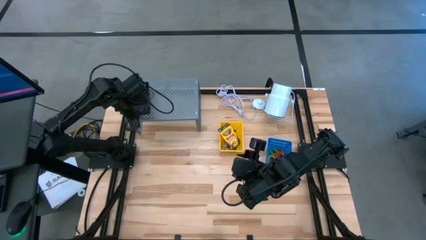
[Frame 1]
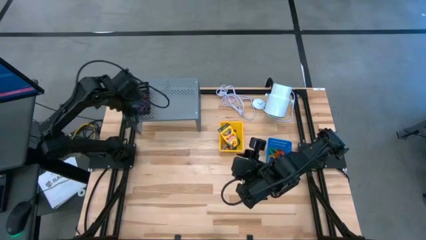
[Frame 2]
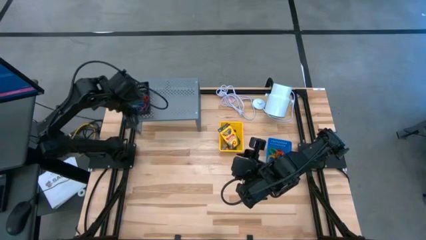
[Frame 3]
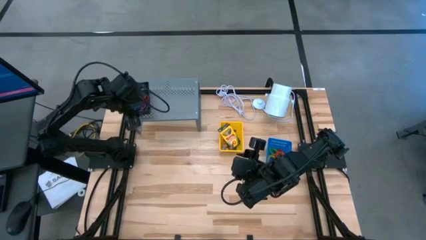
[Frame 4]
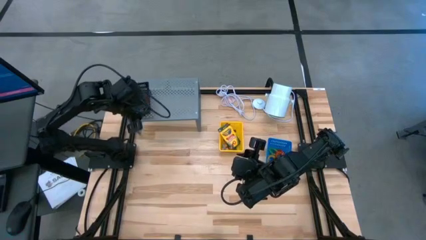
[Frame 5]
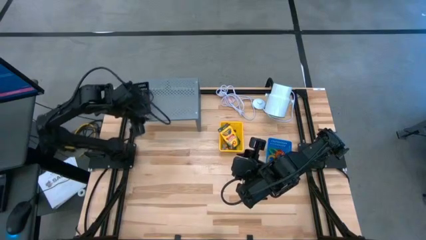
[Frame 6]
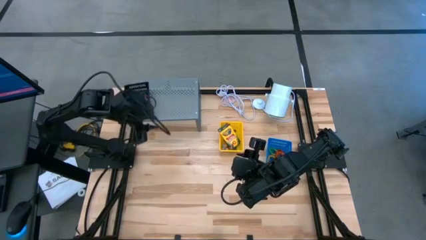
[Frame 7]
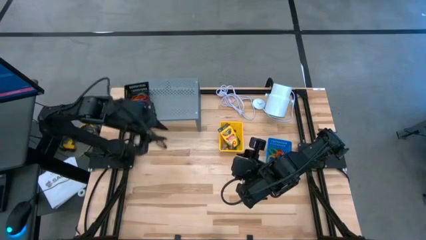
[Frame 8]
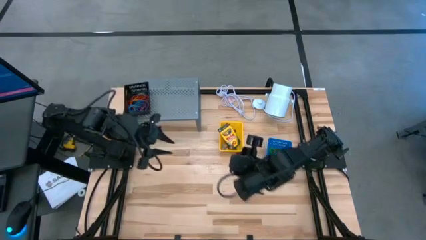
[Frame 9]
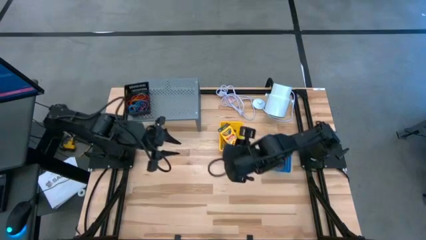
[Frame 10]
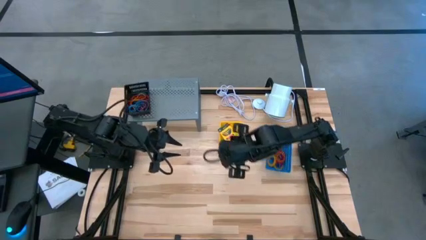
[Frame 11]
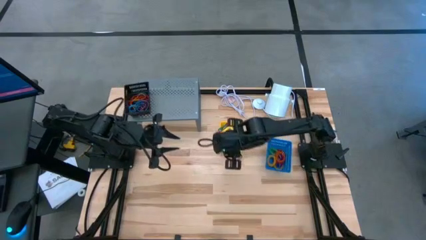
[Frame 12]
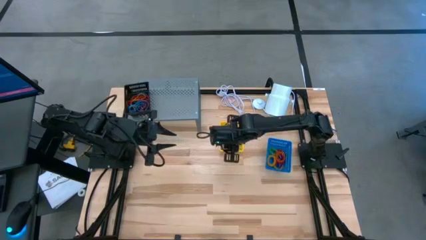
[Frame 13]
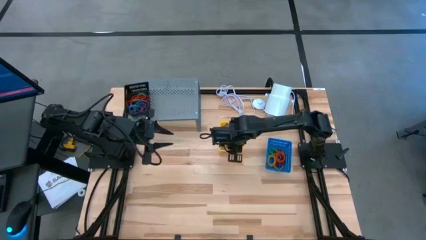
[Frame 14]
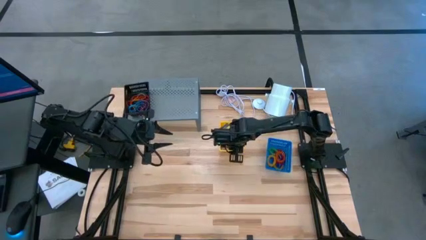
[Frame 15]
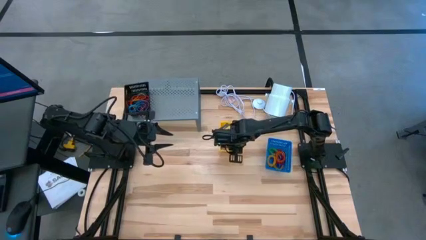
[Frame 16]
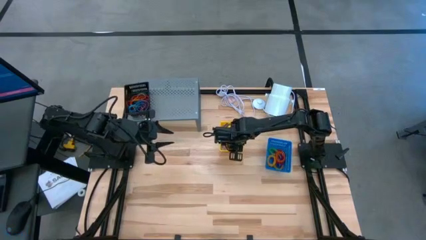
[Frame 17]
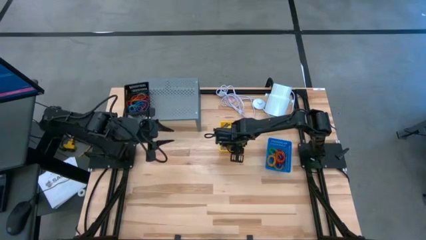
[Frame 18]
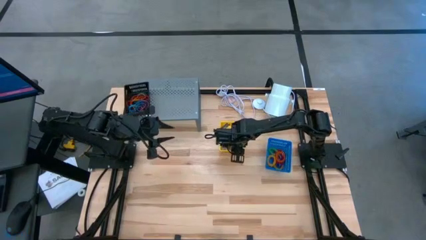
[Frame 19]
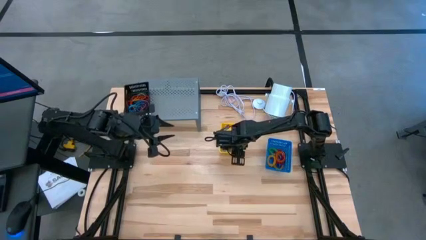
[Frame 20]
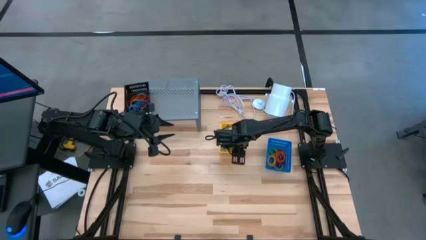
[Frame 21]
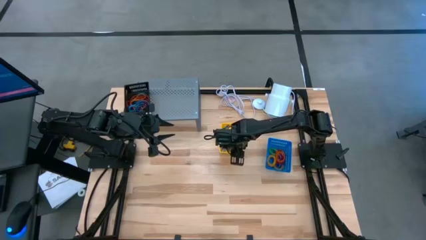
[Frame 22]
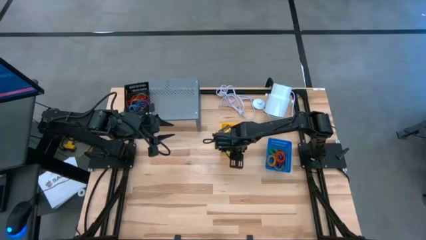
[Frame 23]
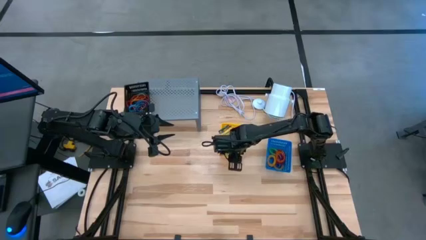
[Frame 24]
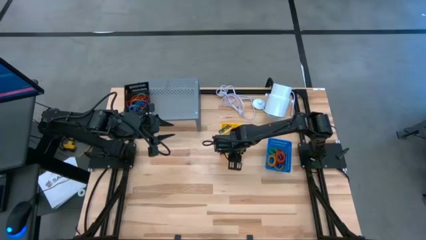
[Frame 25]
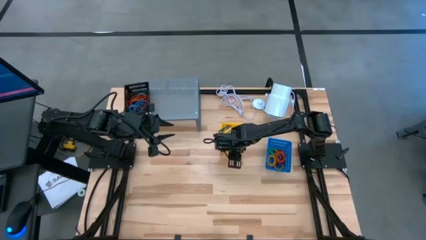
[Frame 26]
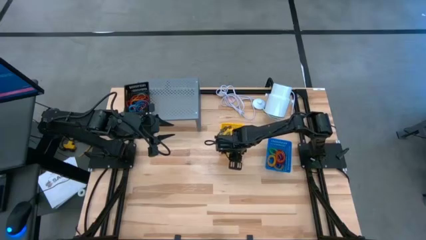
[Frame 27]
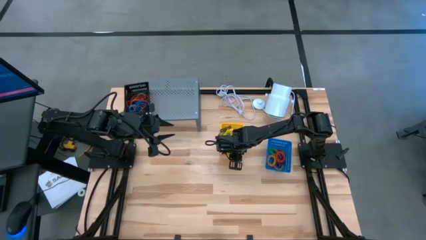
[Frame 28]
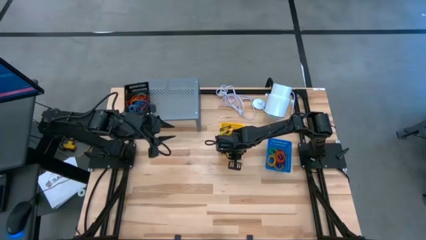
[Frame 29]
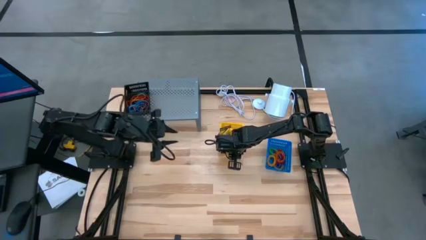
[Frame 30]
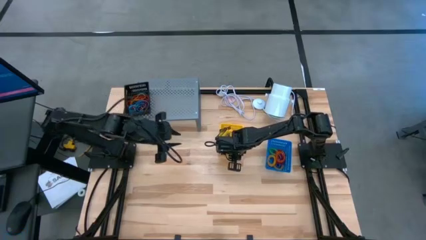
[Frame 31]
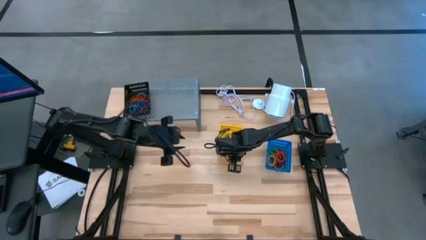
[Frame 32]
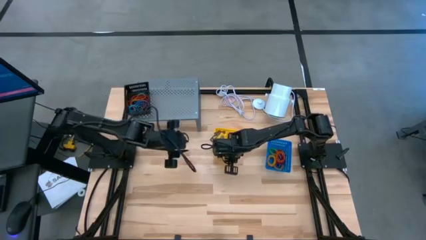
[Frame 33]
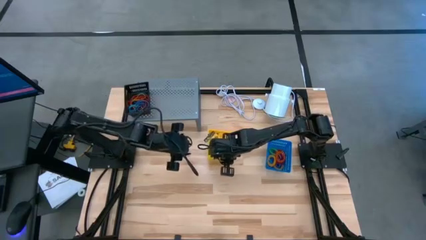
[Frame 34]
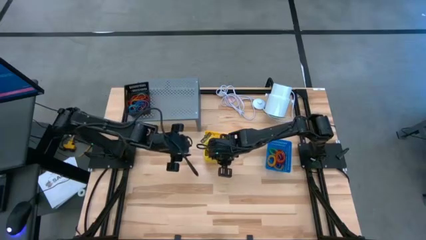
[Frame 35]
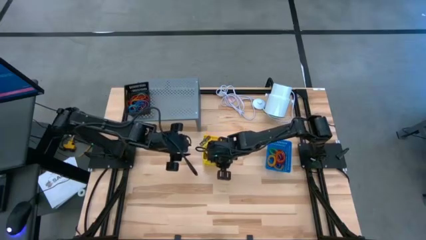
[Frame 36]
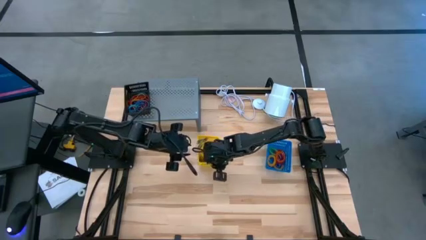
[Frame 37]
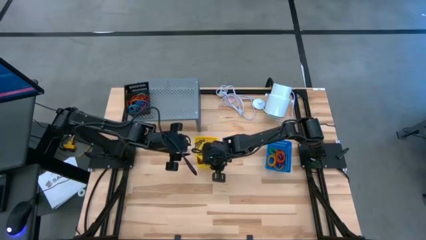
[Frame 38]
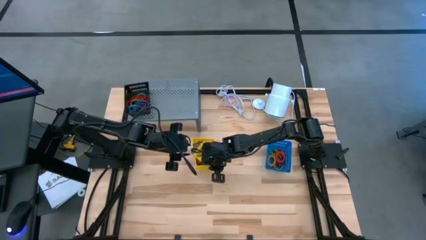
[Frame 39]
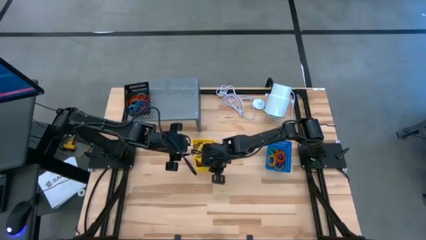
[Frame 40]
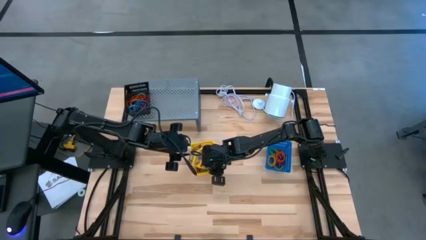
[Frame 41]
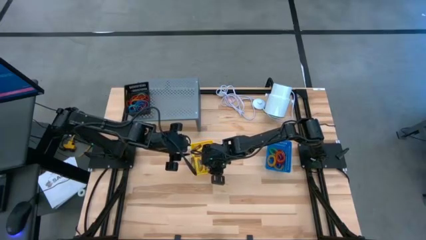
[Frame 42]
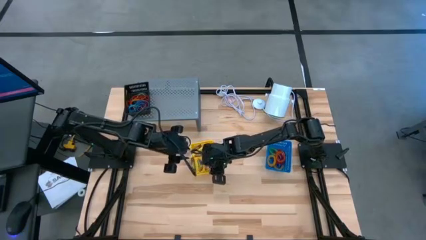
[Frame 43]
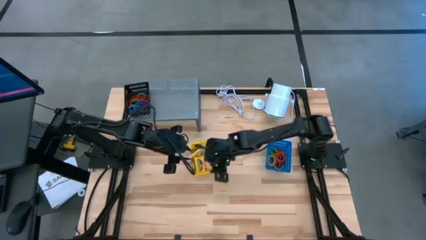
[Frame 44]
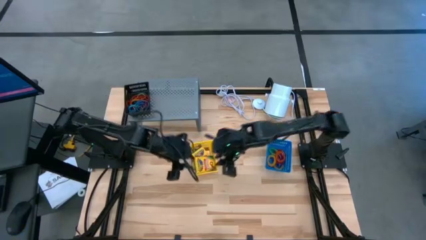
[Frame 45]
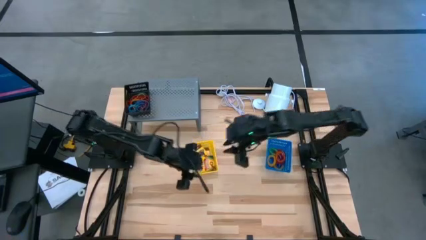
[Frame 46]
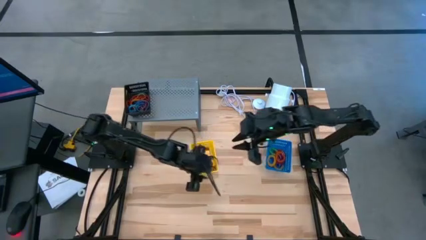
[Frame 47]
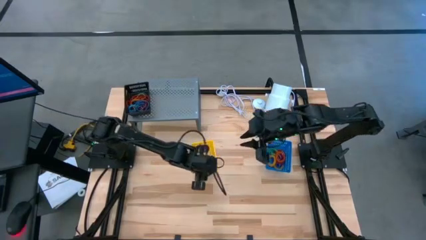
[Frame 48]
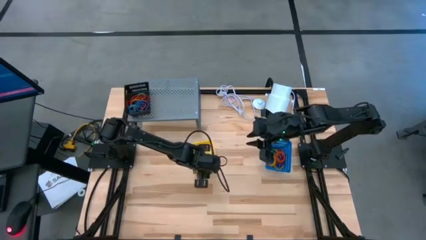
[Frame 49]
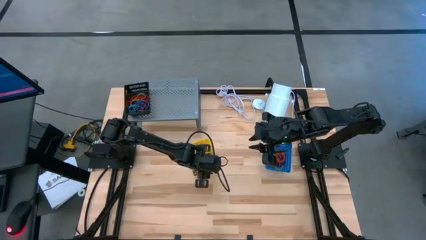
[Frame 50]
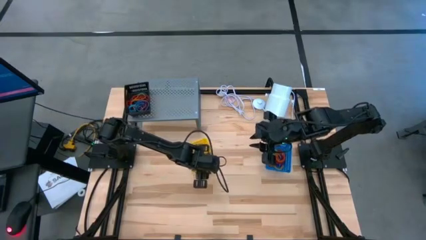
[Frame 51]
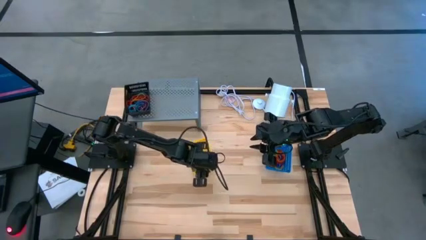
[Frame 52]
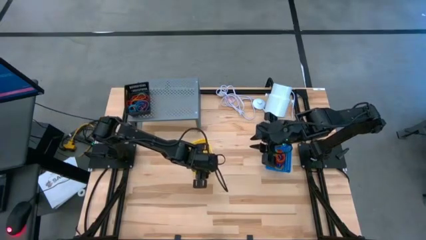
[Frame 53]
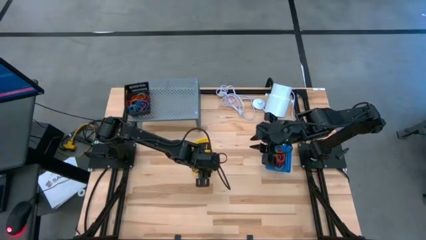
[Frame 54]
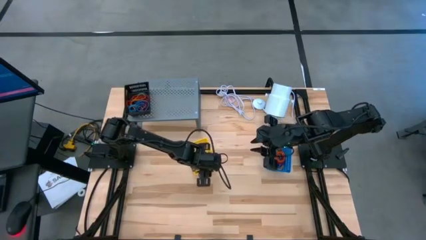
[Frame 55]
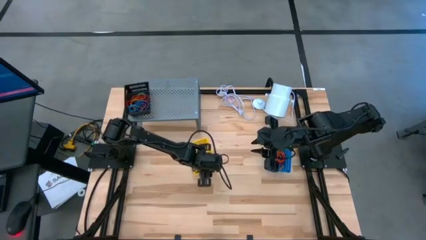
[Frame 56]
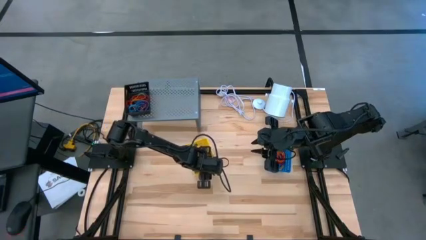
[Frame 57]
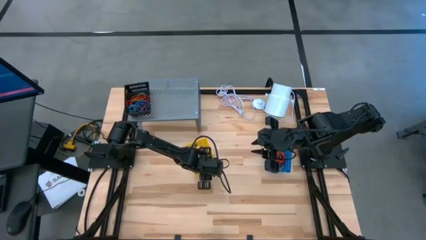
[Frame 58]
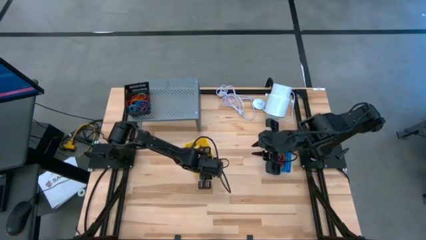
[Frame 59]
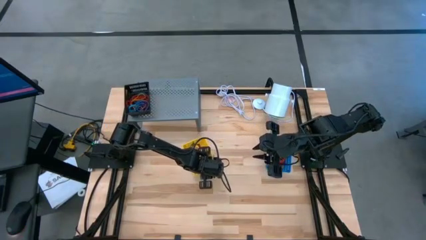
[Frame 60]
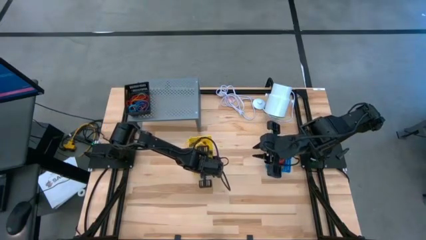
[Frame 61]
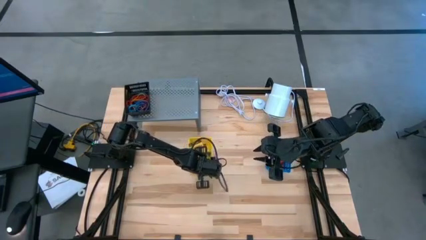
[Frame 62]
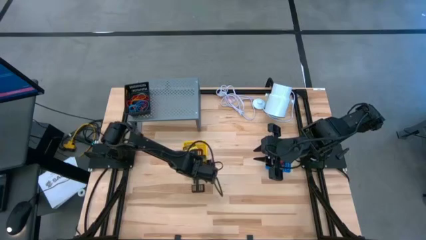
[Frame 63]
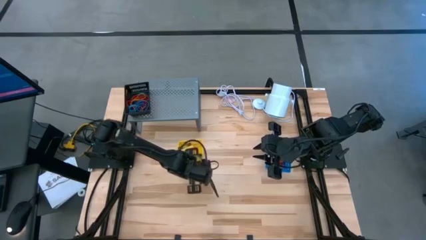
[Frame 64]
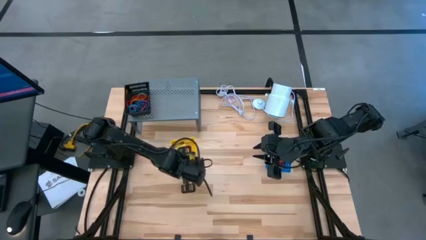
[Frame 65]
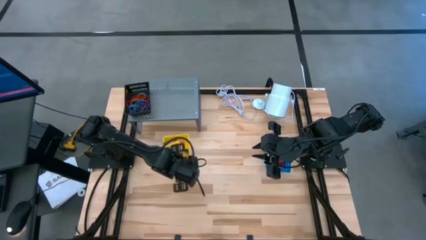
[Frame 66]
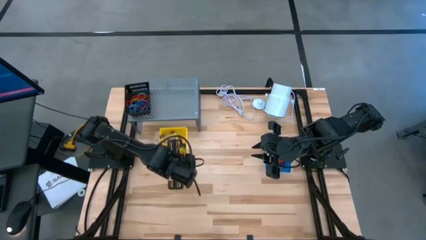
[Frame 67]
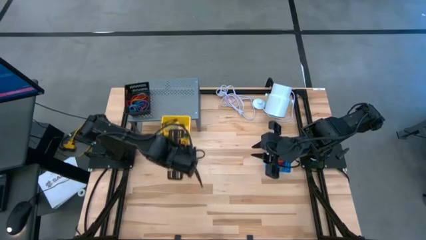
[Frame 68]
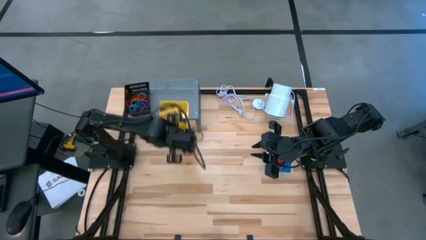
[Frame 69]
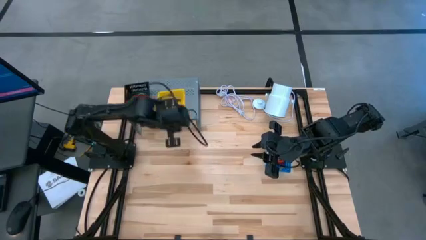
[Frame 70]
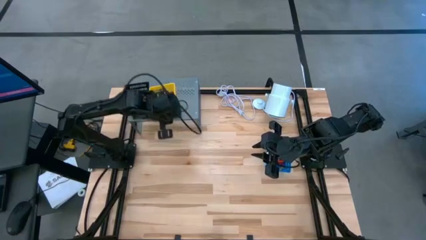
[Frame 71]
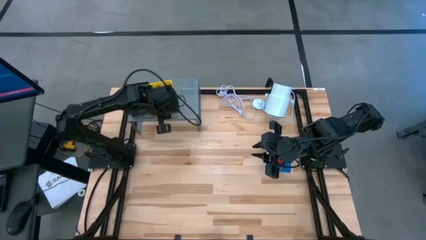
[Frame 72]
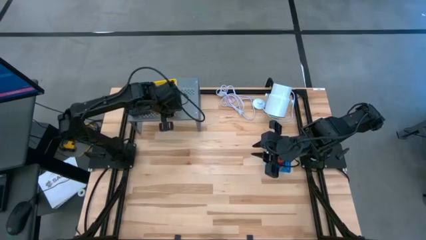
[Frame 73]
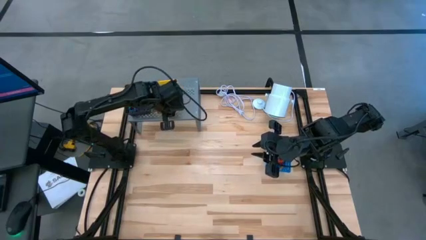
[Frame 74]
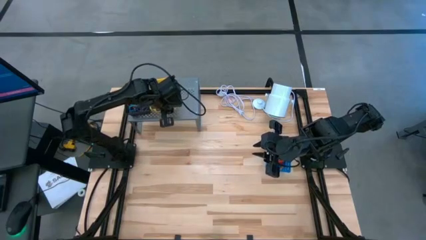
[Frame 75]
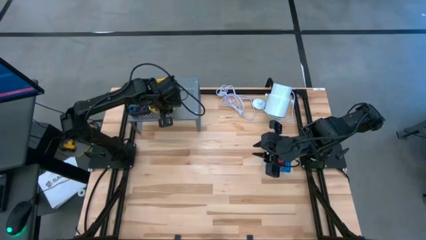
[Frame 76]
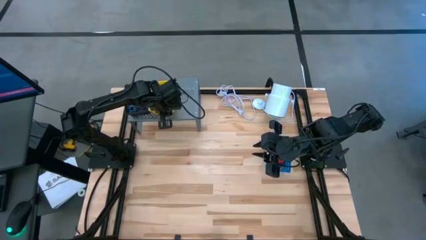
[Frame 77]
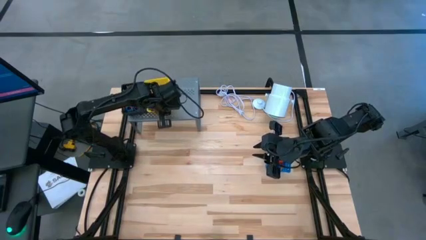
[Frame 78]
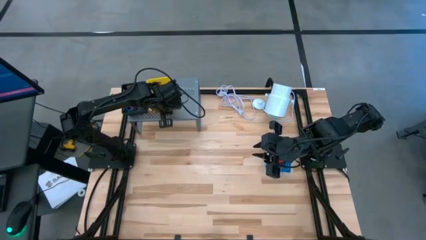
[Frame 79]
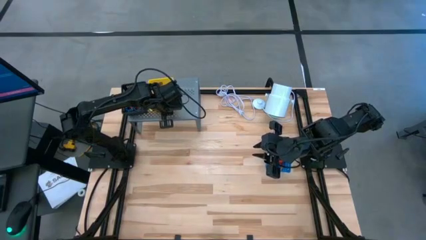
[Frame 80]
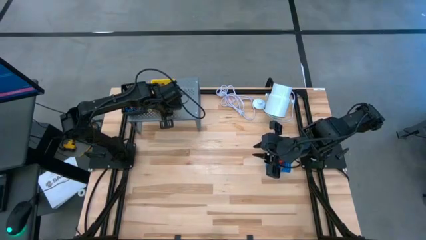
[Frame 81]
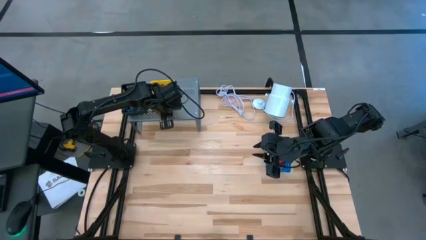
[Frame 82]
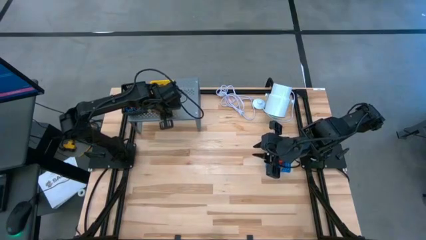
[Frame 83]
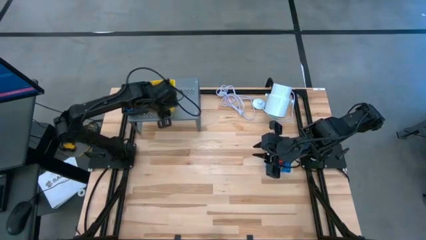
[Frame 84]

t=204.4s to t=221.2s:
Task: Pick & Place Office Desk Supplies
Put the yellow bin on the shelf
